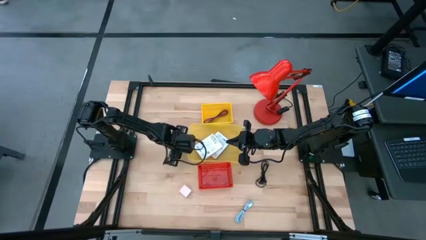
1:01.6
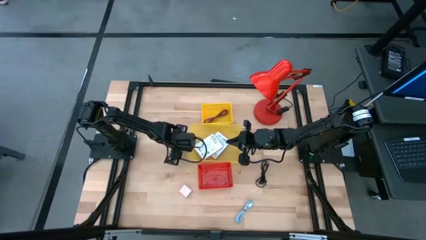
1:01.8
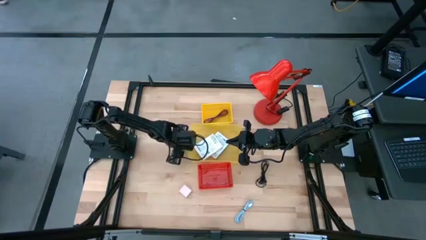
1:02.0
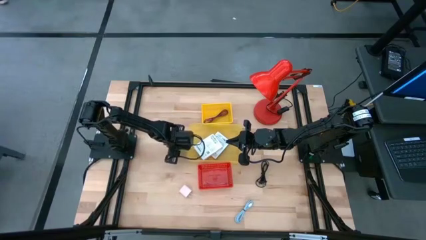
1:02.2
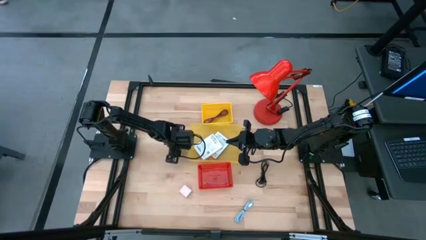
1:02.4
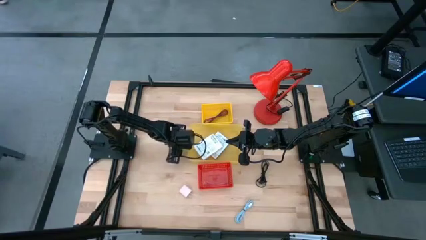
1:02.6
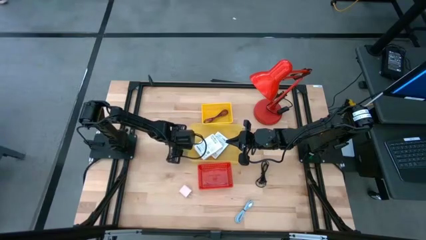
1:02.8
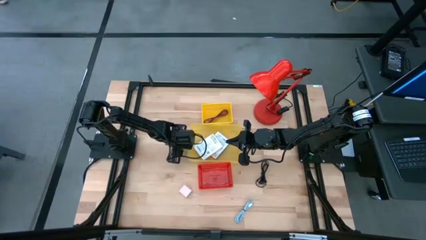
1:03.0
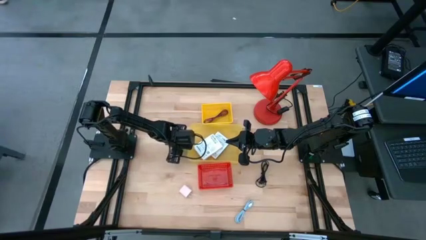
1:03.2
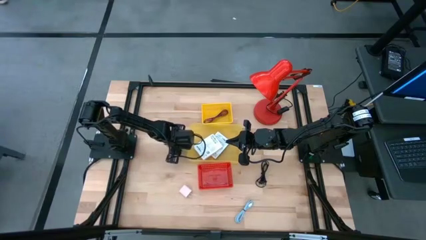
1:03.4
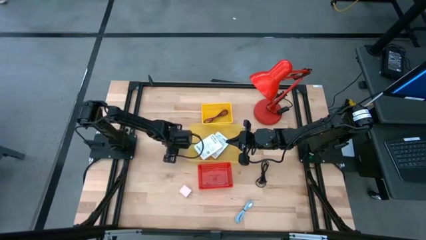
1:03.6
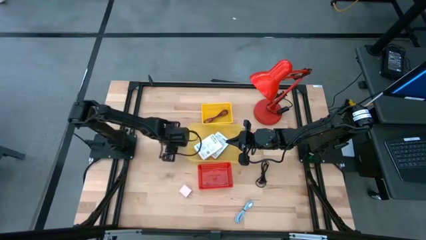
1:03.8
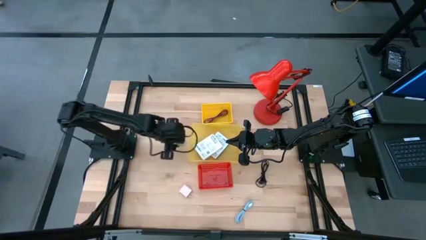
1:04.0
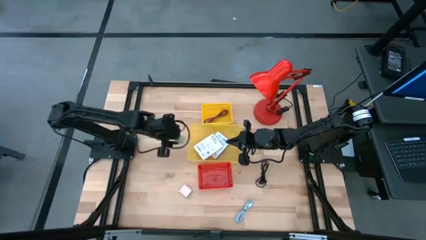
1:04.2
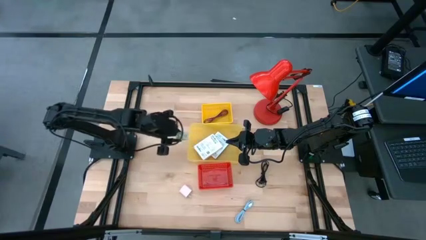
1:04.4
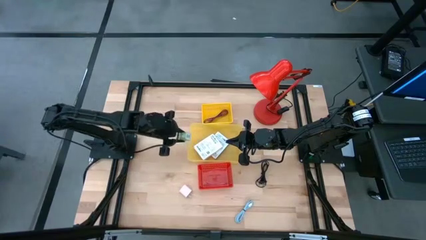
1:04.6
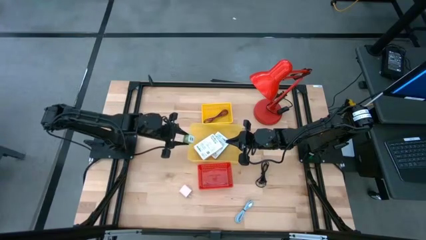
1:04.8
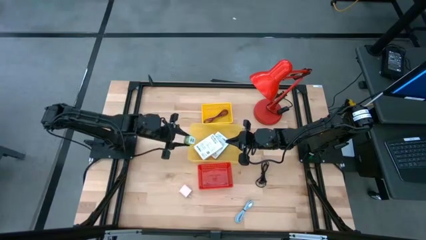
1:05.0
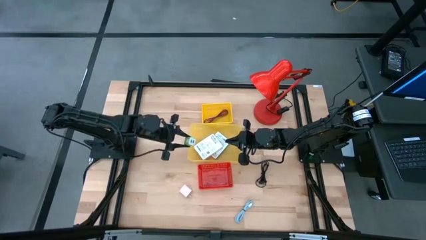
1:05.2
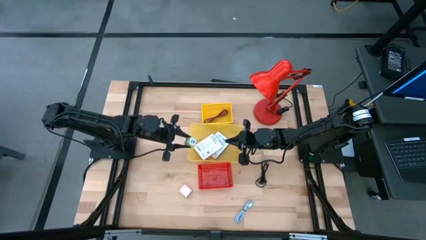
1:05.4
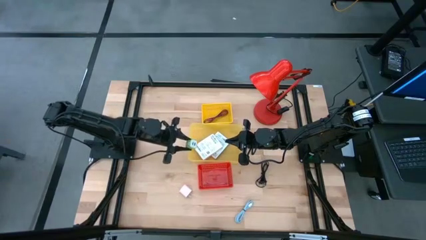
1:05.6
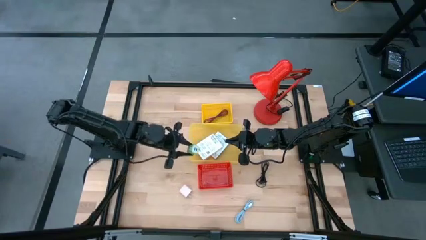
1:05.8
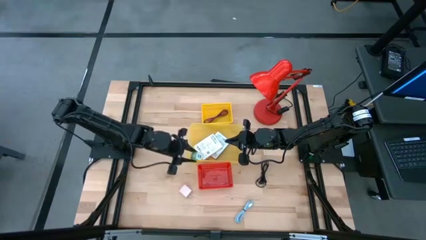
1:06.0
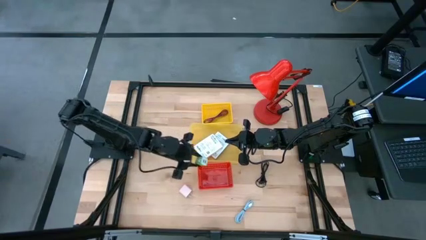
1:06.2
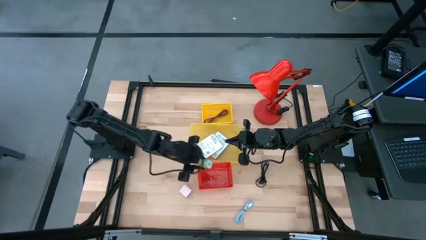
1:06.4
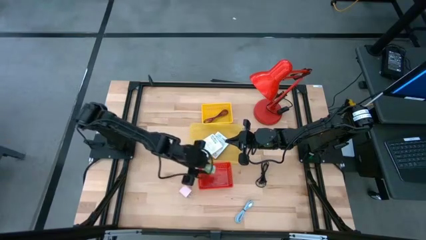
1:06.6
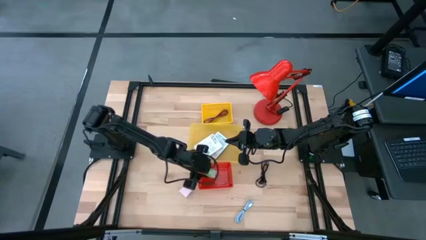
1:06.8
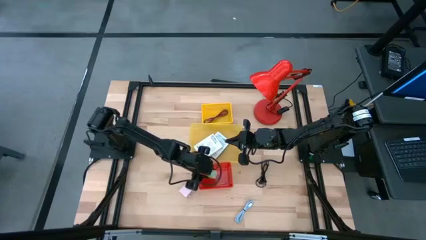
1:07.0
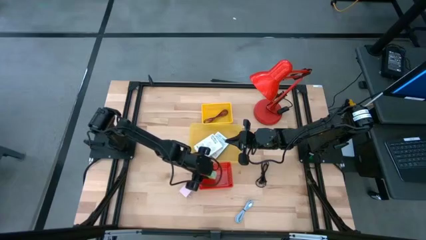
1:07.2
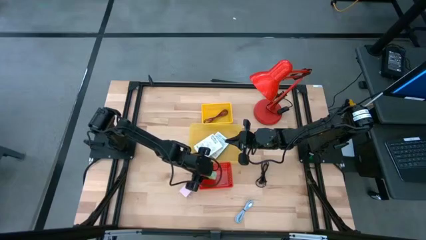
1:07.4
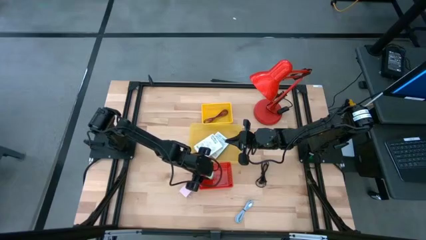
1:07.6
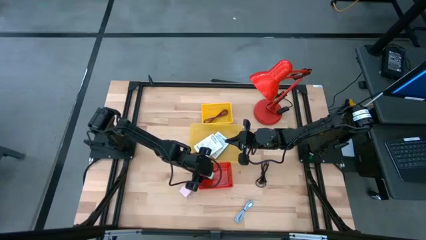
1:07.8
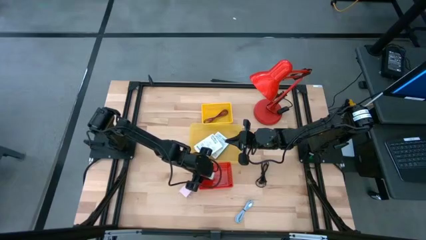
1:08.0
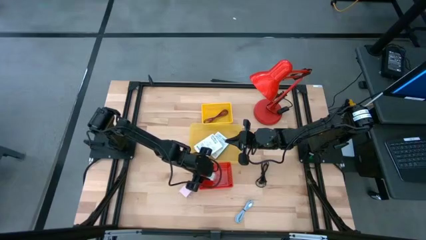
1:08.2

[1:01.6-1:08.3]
Task: Pick and place items into bin
Put the green charger adapter into the red bin

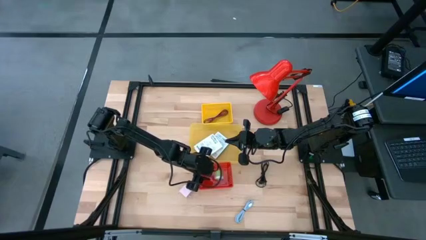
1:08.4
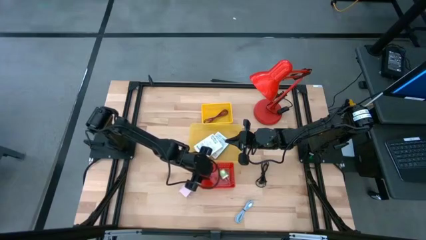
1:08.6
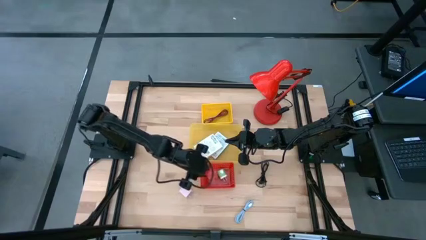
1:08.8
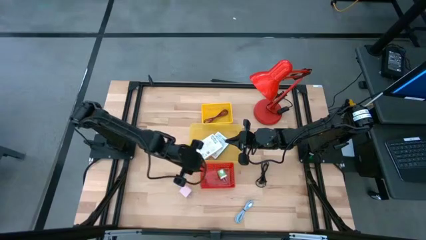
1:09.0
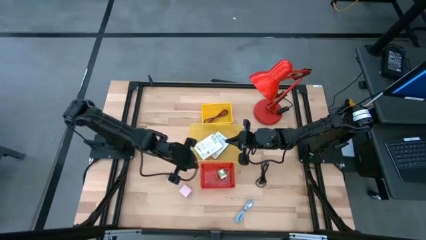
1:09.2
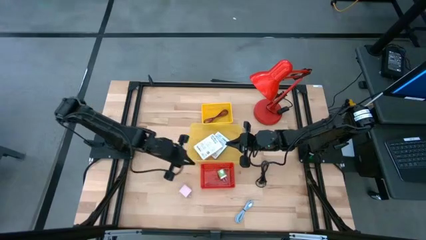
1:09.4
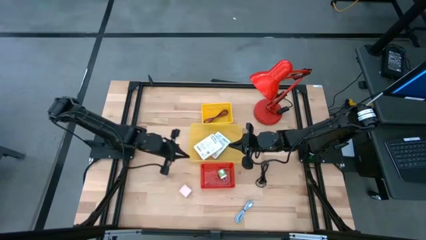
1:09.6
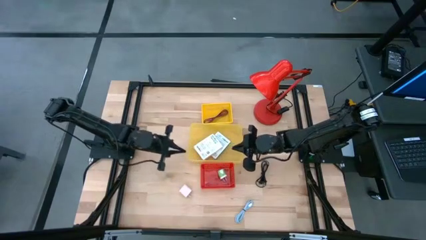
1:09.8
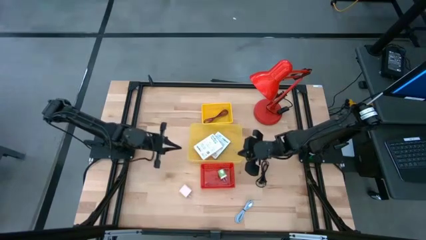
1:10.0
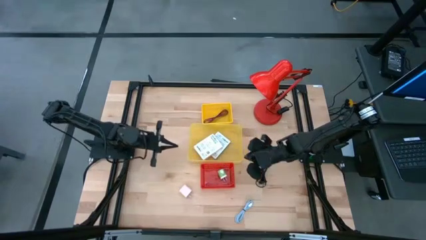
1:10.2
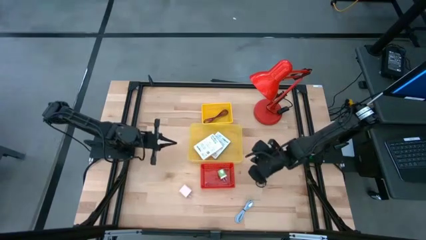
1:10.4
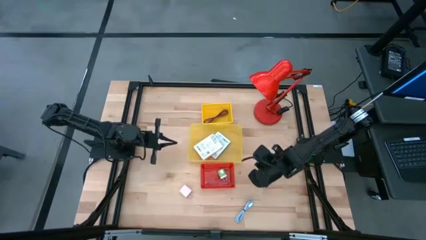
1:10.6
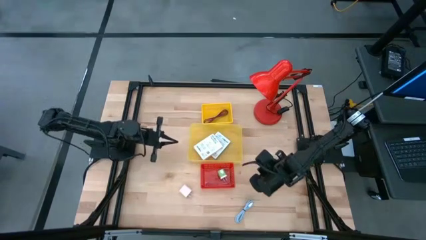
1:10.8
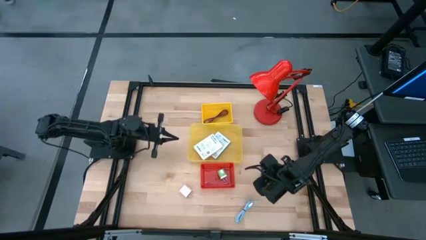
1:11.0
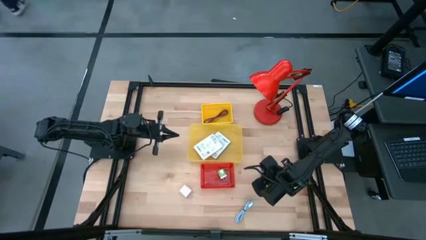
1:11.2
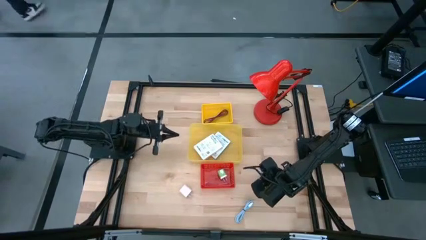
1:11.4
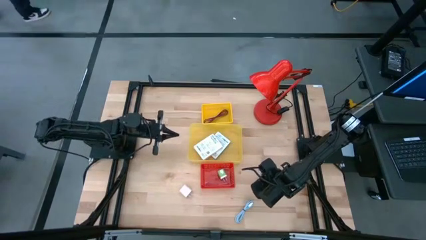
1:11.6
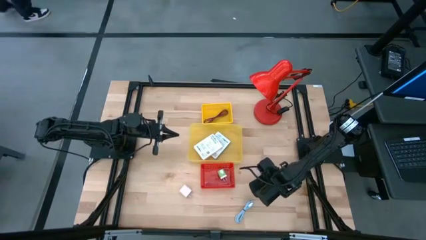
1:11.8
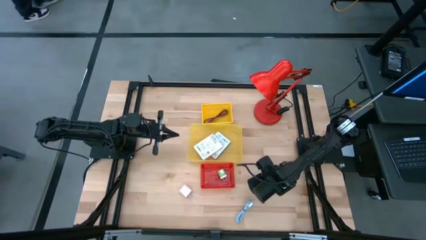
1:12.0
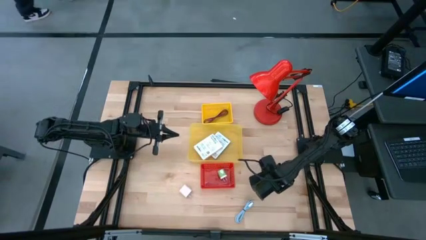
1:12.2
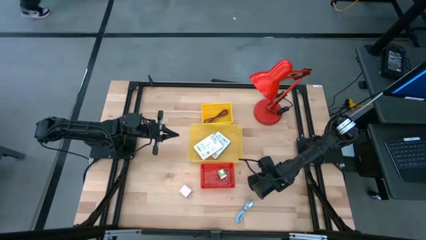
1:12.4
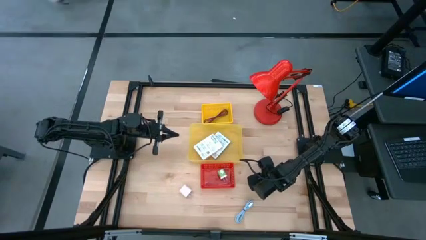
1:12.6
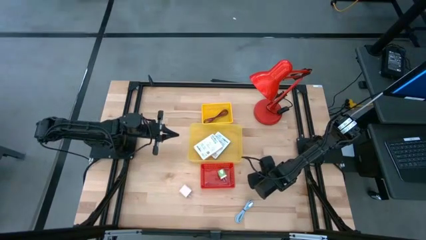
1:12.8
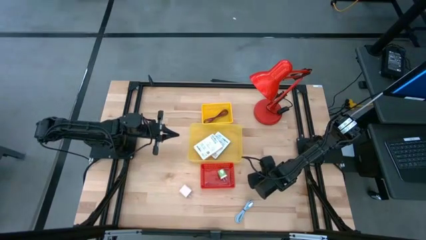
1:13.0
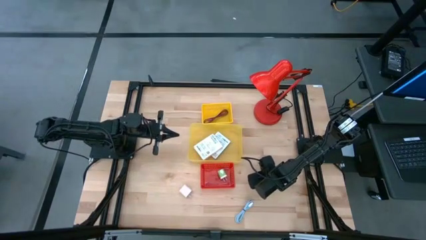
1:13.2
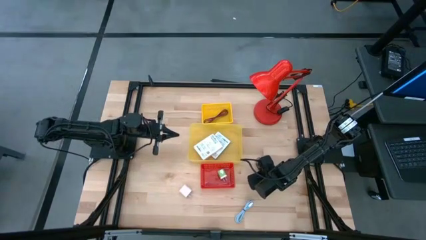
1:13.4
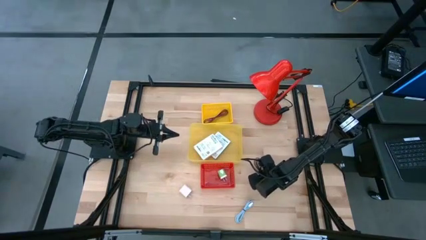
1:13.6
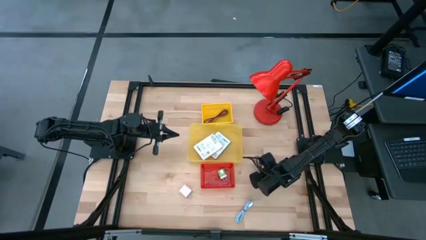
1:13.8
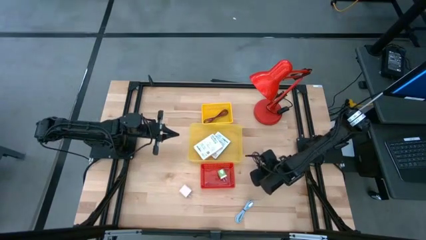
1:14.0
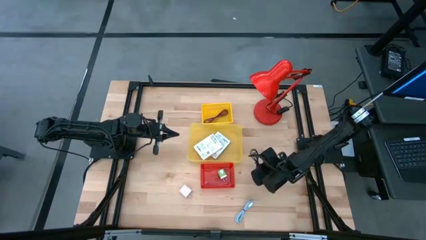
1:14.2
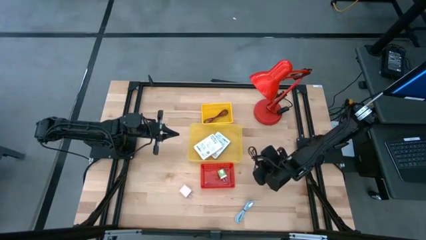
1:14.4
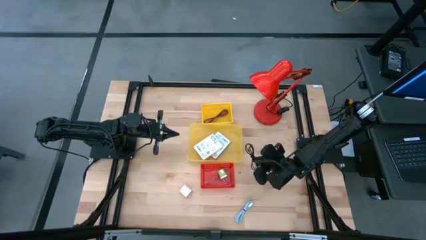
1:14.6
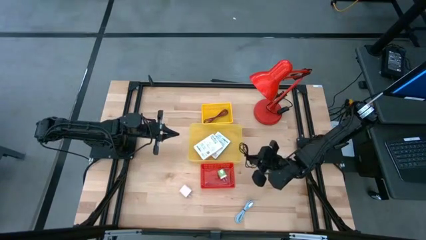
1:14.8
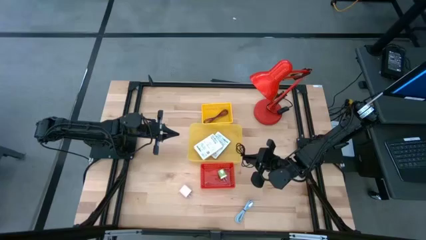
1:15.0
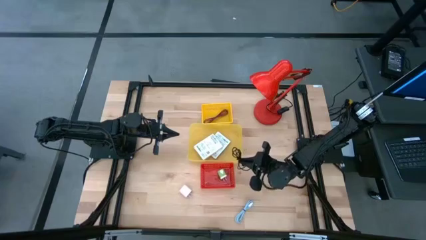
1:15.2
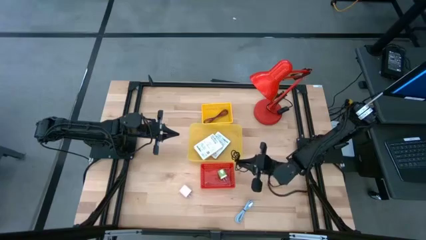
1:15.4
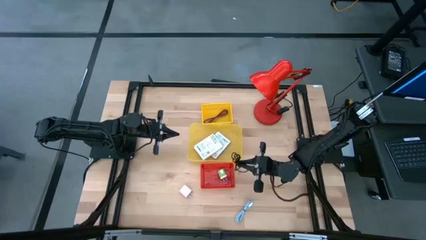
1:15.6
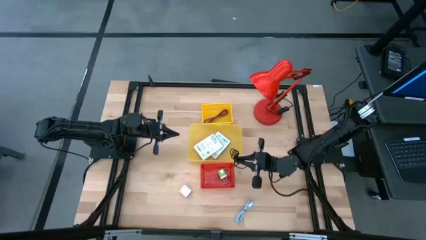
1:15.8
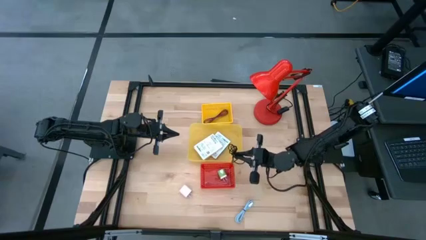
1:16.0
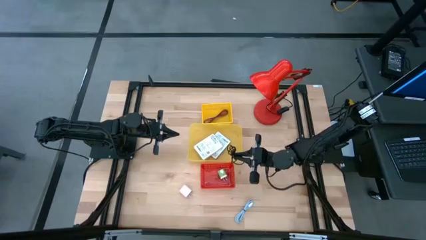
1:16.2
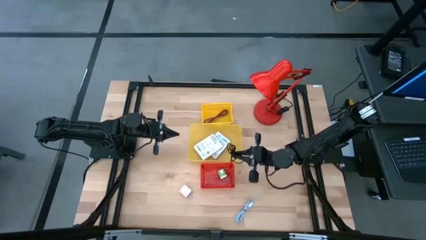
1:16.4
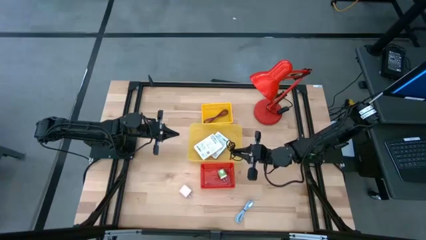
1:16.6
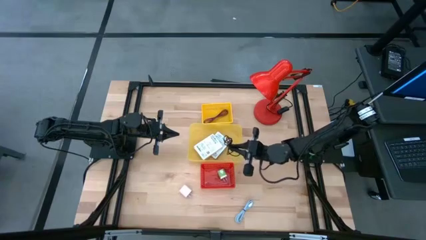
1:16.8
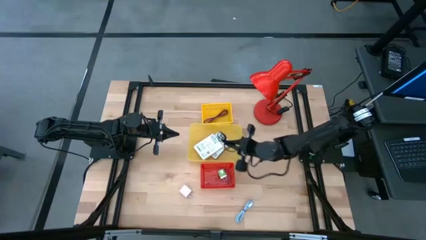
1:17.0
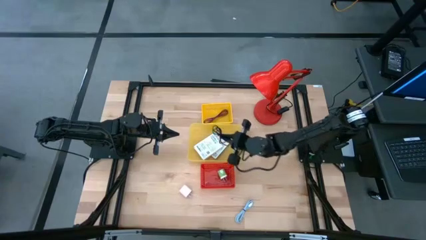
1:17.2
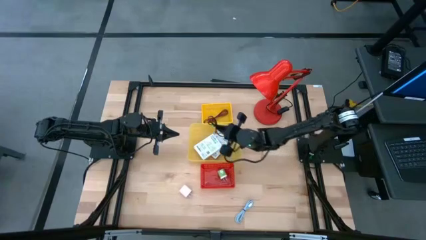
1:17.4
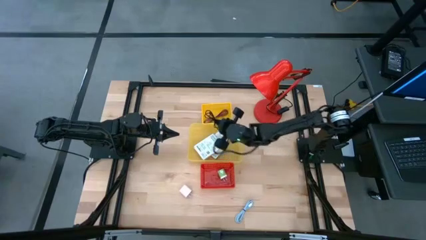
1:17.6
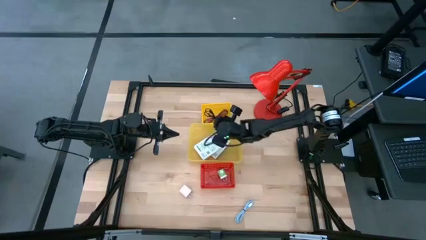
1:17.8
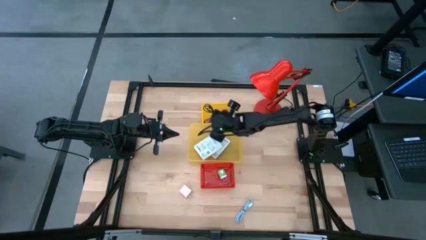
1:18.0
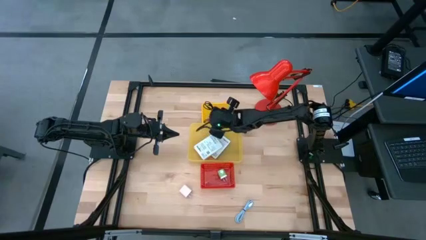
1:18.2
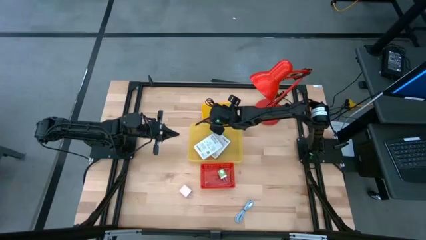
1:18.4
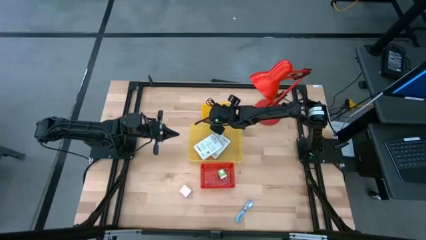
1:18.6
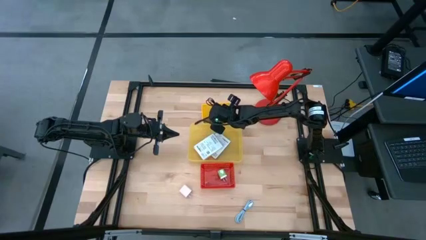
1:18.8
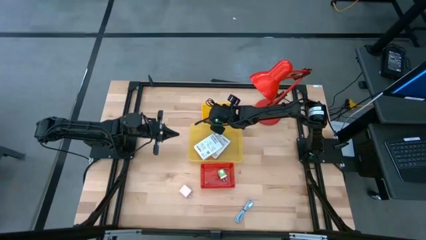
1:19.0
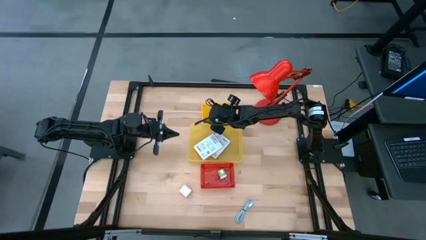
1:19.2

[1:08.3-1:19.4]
Put the black charger cable into the yellow bin
